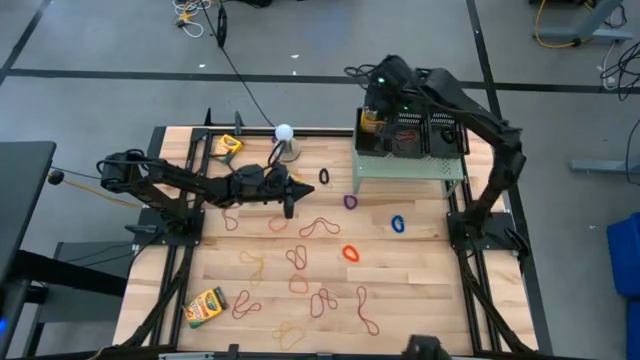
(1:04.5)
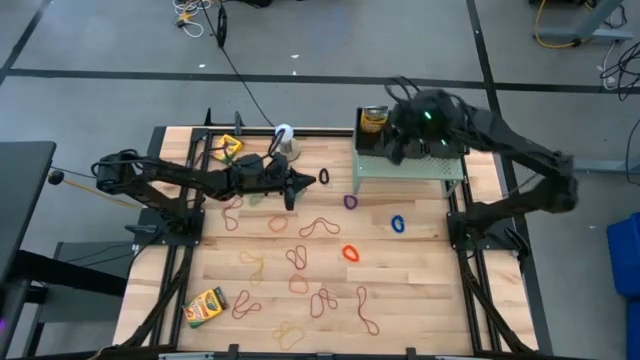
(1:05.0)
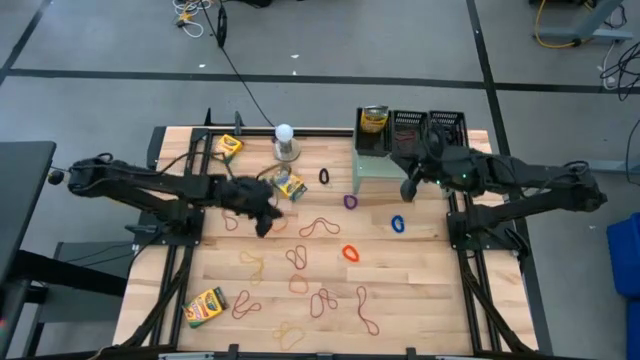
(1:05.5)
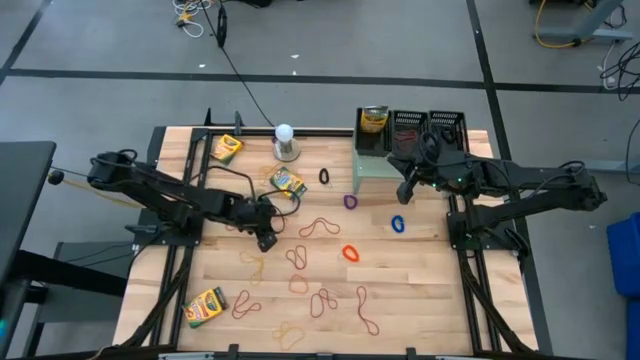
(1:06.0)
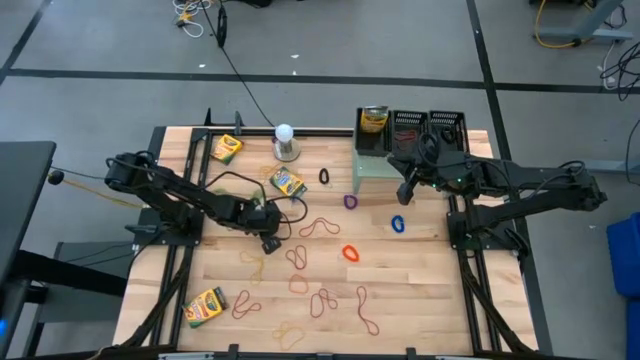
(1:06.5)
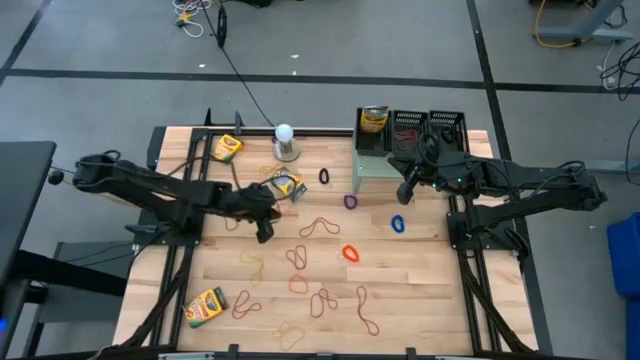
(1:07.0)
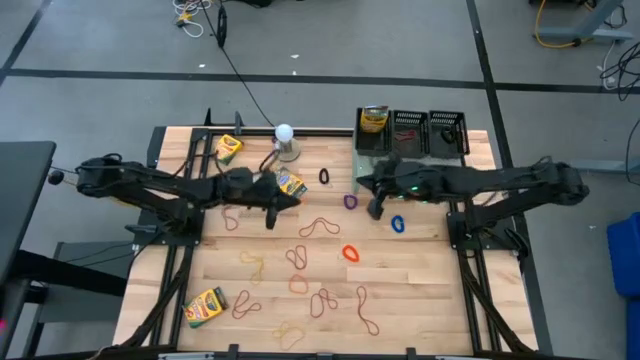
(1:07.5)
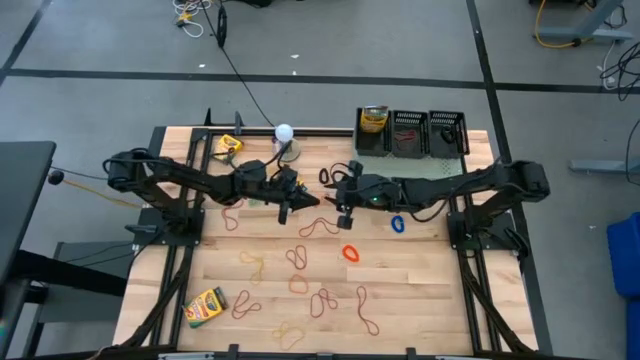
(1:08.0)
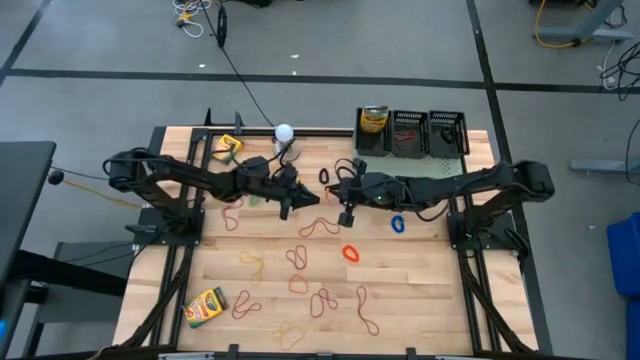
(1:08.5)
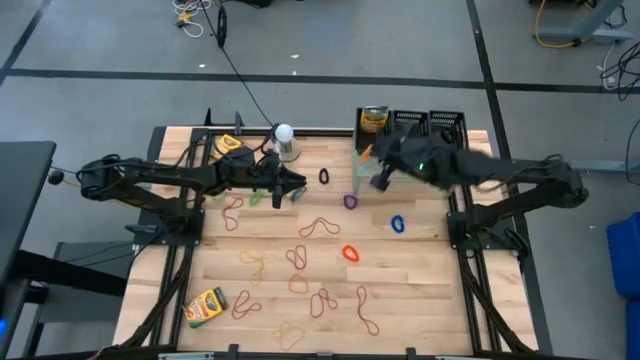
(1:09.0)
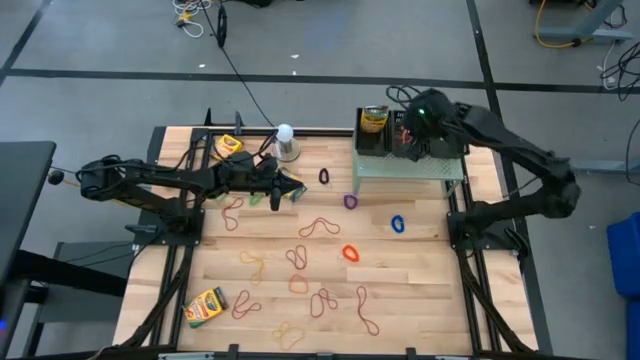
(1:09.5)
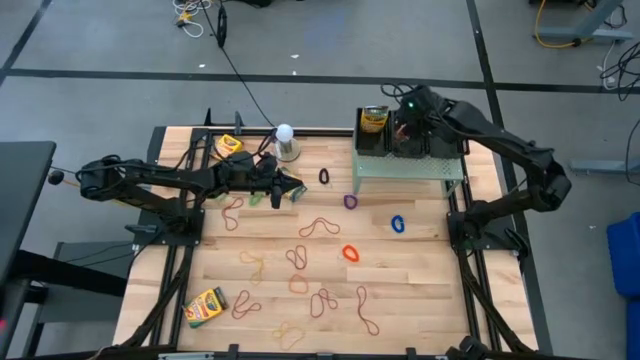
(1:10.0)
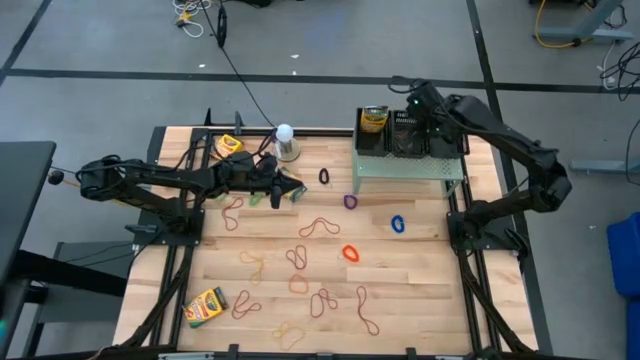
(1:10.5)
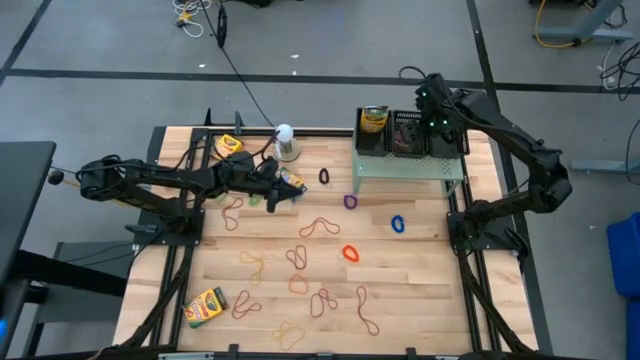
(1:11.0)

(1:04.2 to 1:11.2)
Task: Pick & Place Office Desk Supplies
Put the middle orange rubber band into the middle basket on the shelf

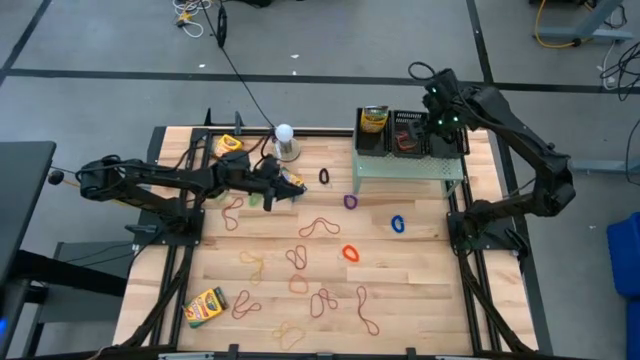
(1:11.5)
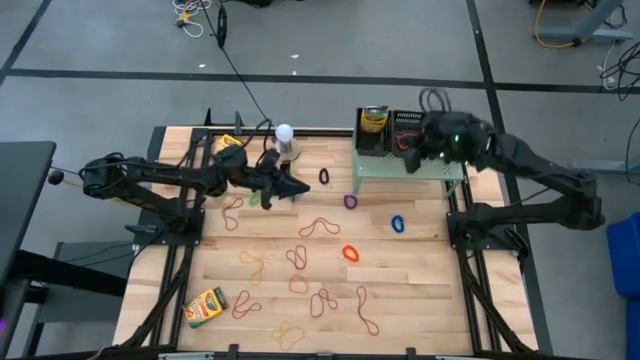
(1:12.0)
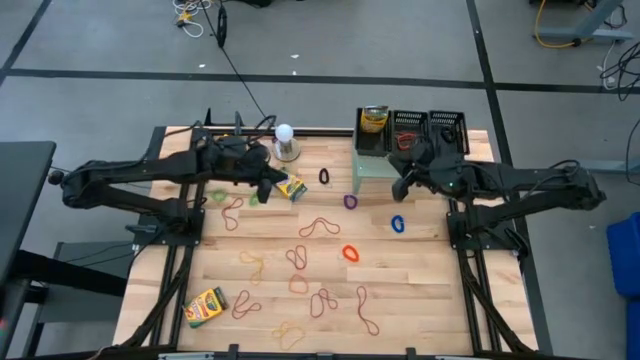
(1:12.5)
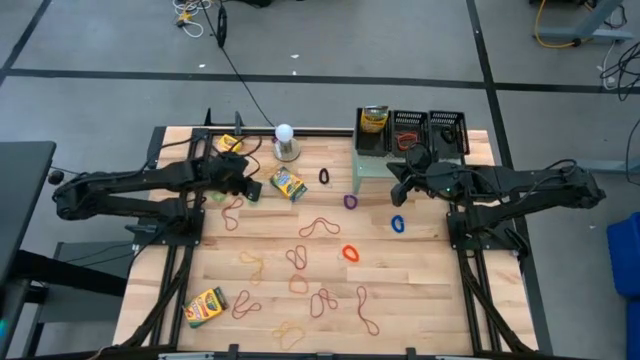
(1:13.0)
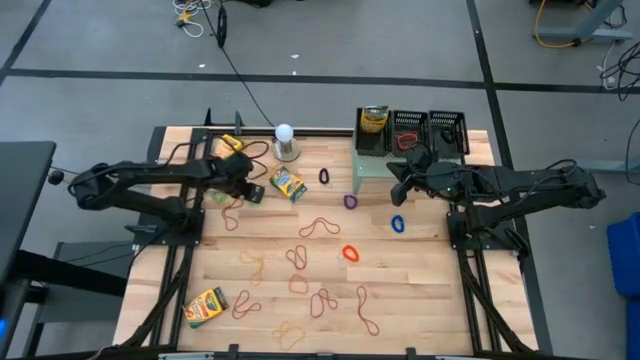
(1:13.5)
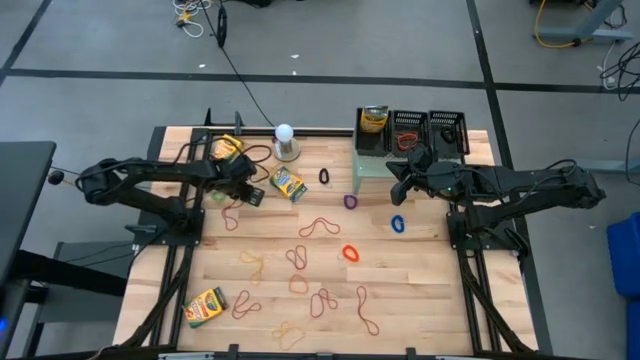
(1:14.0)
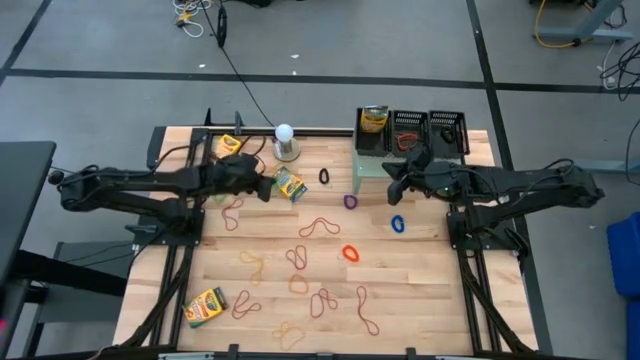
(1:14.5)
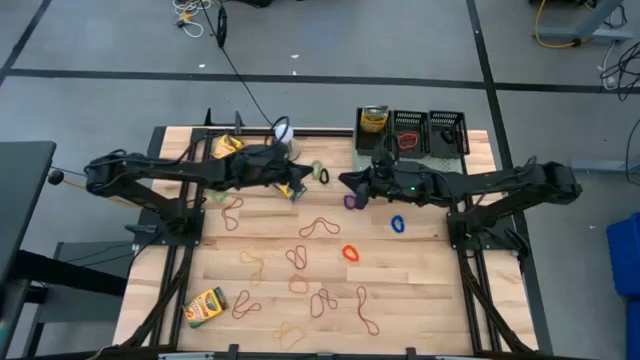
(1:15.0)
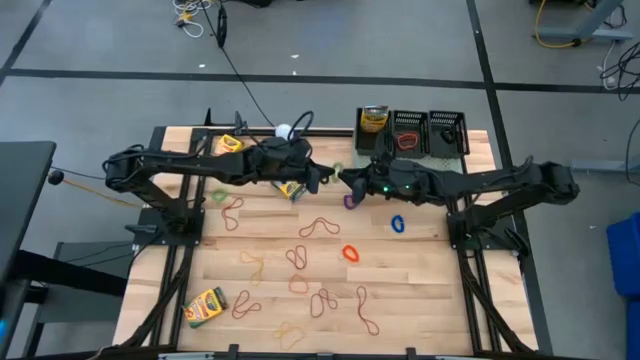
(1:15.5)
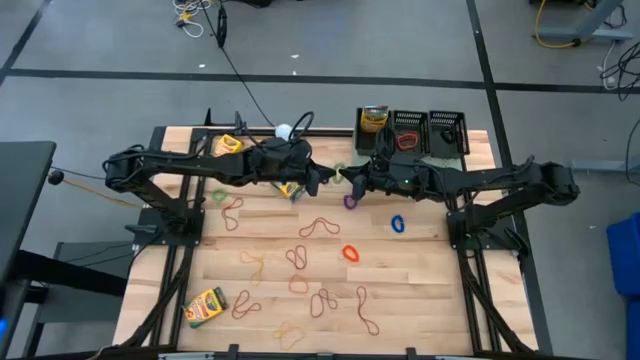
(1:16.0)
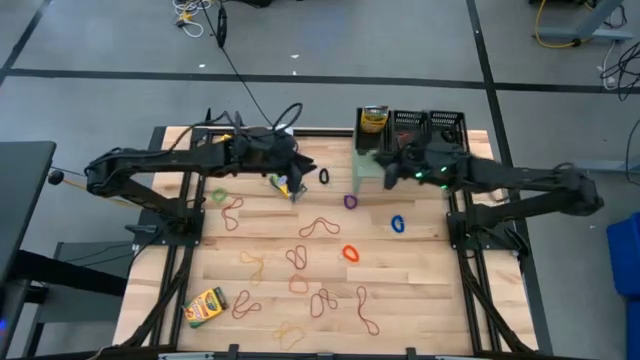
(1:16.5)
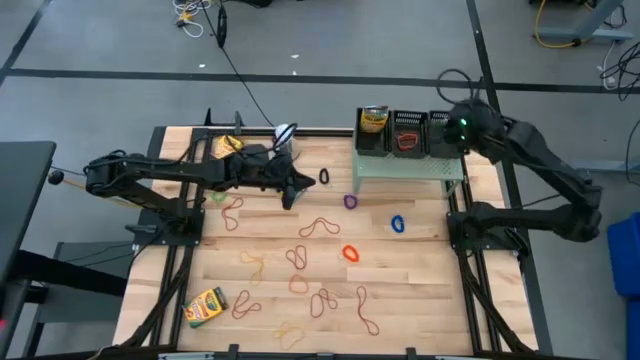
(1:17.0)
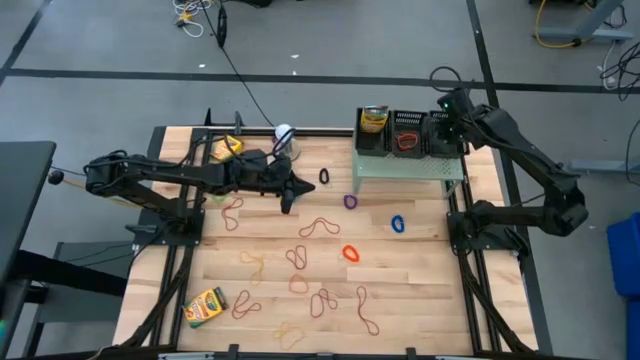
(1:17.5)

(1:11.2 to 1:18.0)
Put the right green spring keychain into the right basket on the shelf

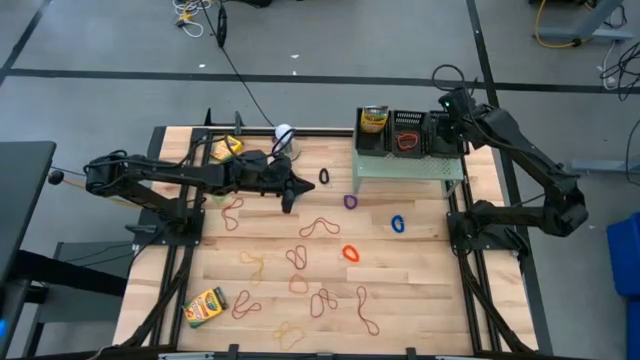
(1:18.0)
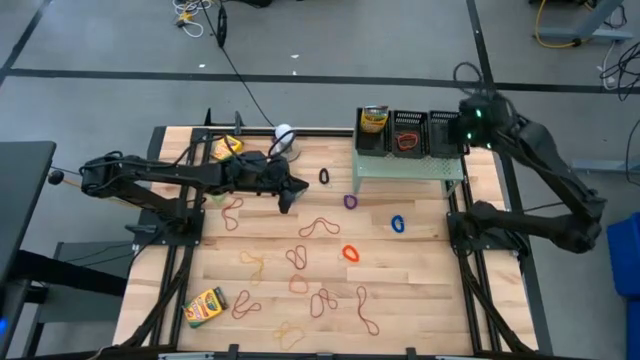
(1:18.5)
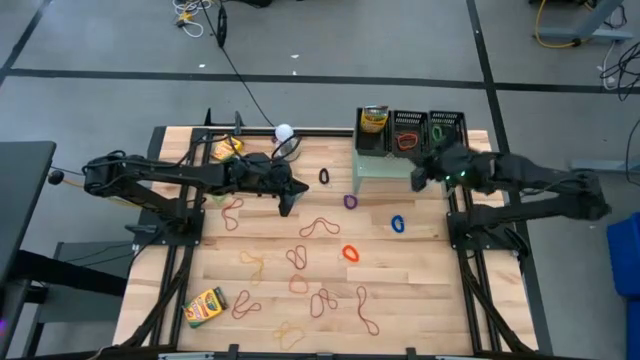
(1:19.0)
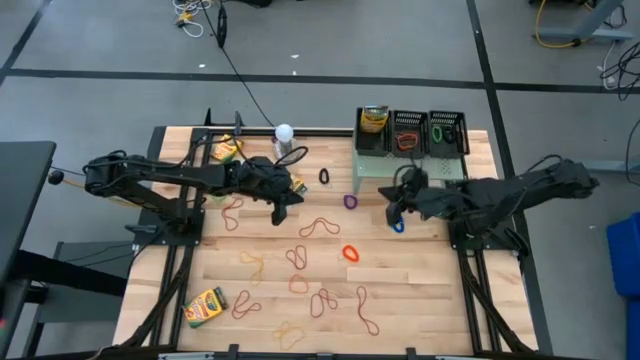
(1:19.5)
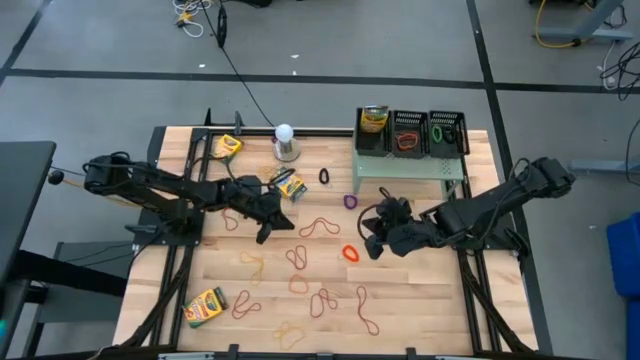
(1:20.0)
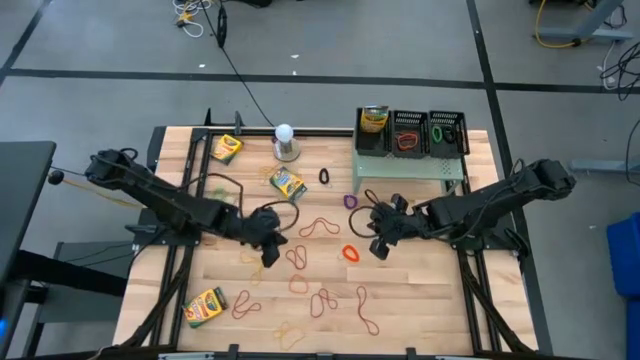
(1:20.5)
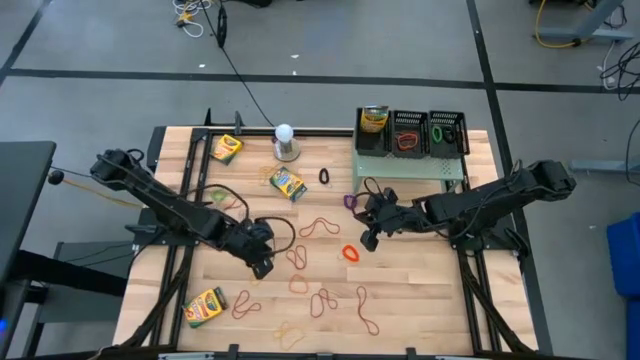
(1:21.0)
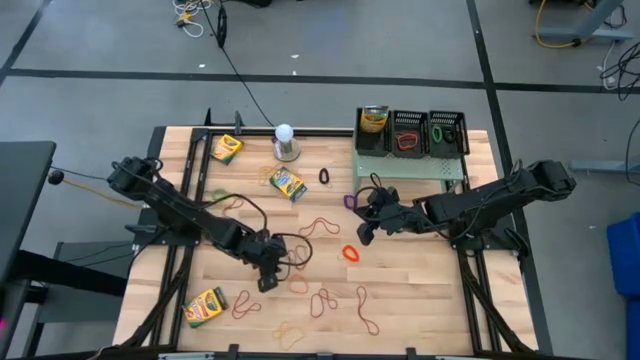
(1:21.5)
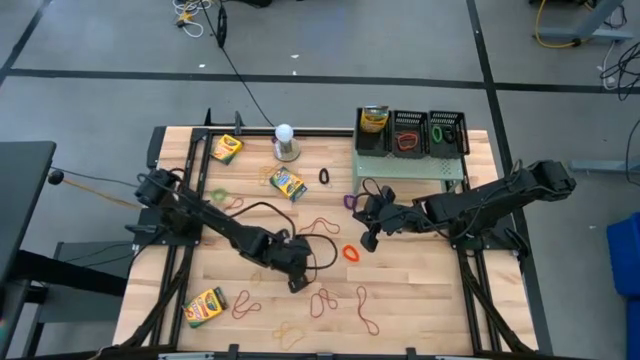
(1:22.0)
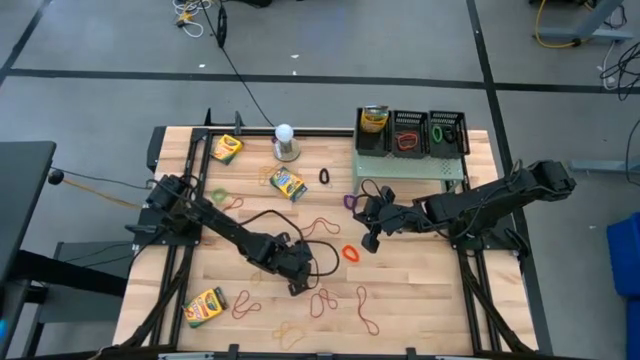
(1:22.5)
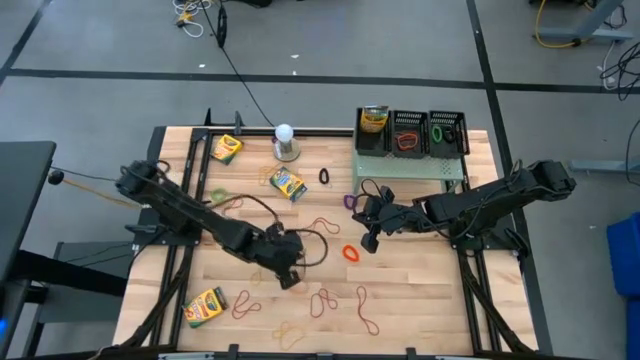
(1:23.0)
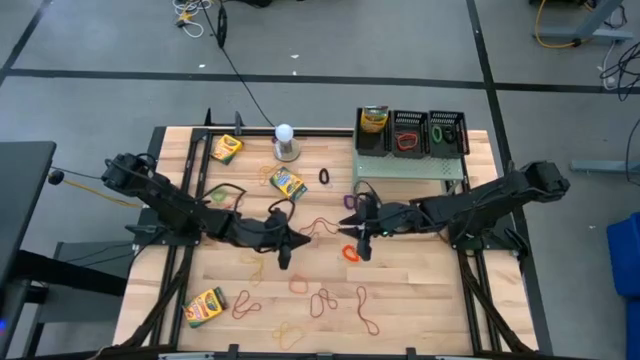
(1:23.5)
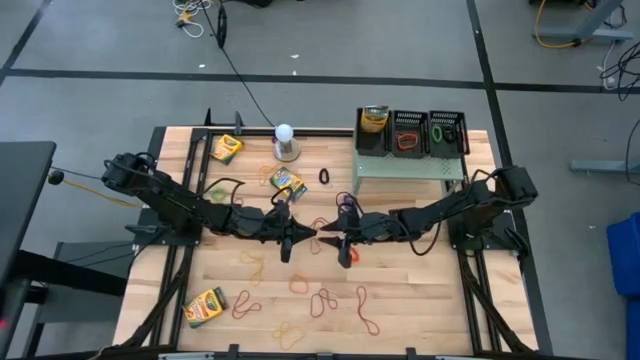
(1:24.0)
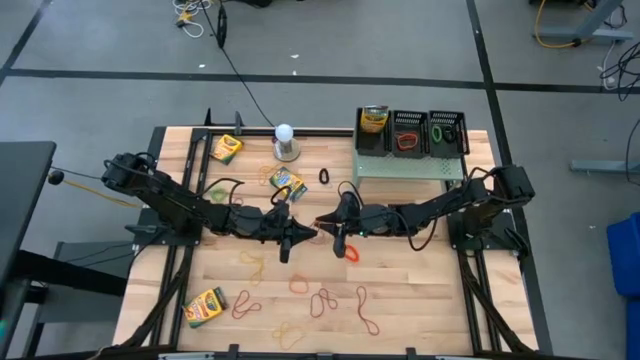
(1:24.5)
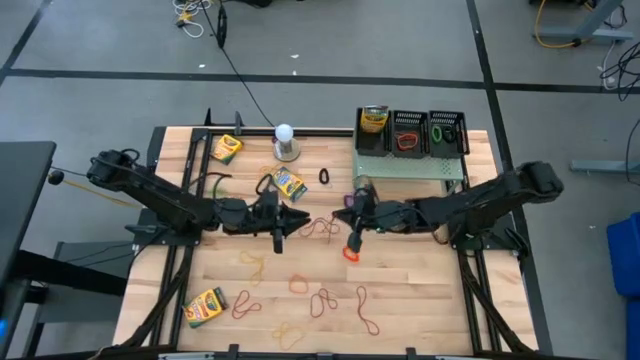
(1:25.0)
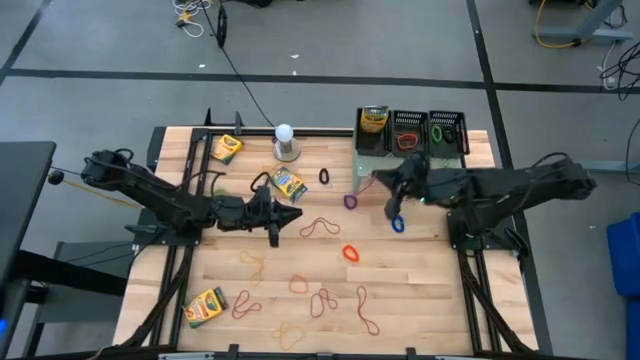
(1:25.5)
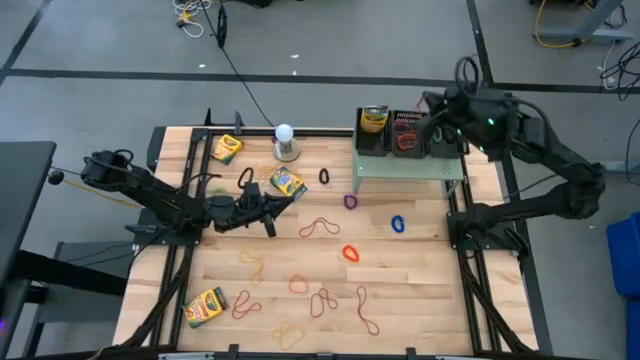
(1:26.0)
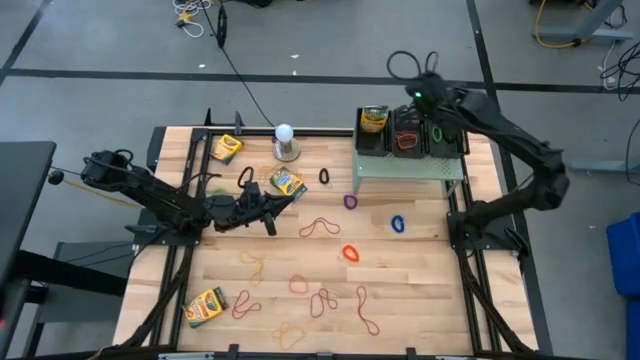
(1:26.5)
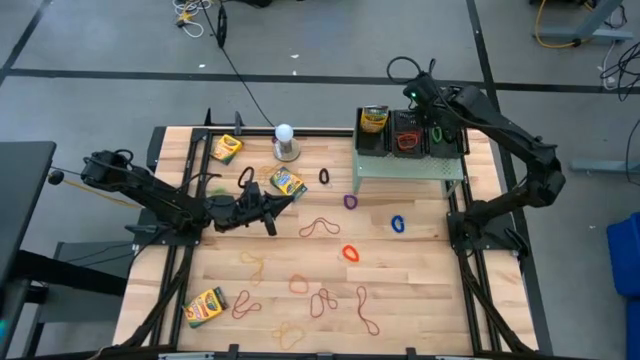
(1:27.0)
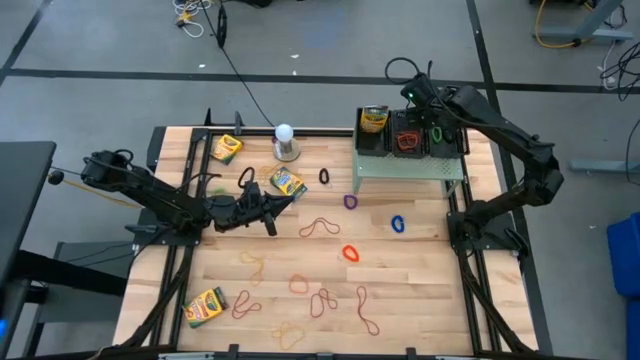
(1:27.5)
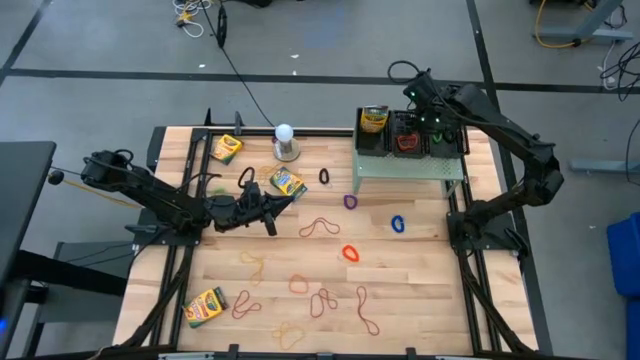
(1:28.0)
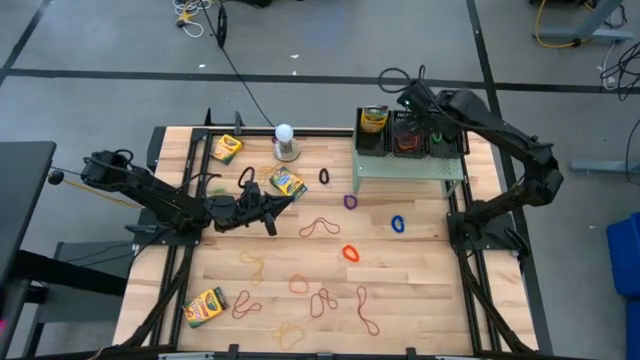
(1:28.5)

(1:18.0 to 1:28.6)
Put the red rubber band into the middle basket on the shelf
